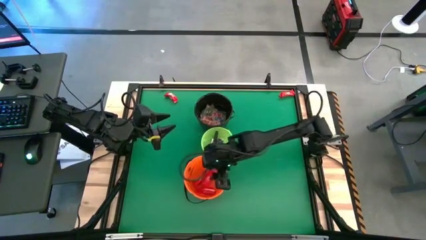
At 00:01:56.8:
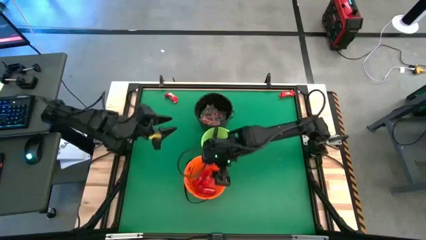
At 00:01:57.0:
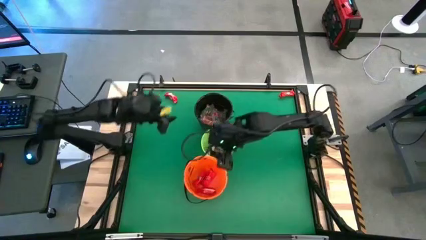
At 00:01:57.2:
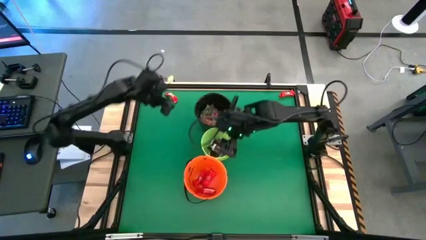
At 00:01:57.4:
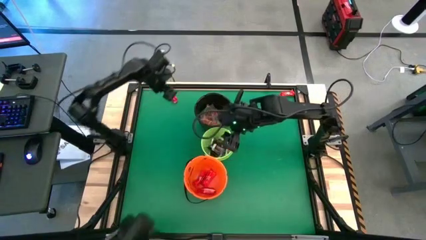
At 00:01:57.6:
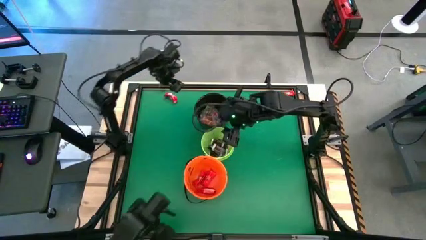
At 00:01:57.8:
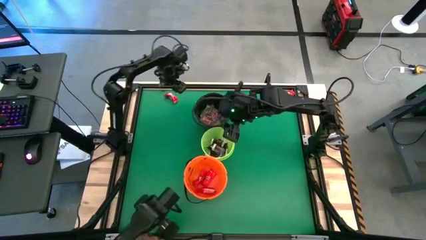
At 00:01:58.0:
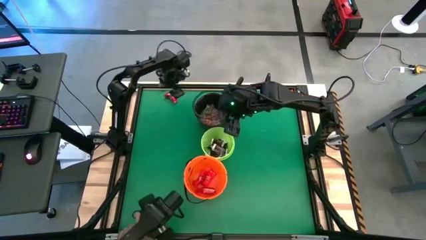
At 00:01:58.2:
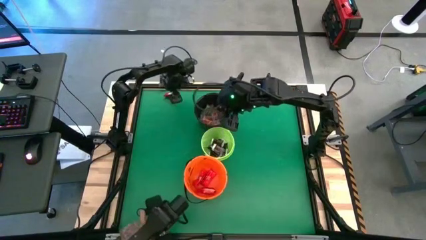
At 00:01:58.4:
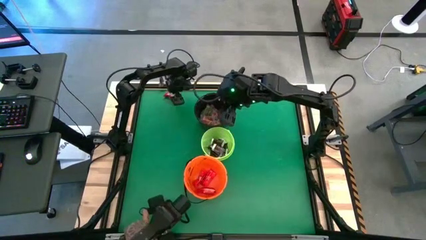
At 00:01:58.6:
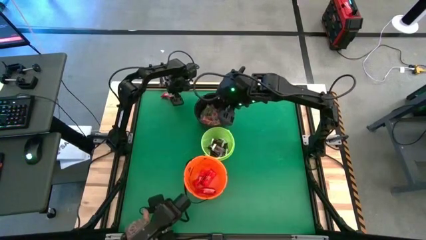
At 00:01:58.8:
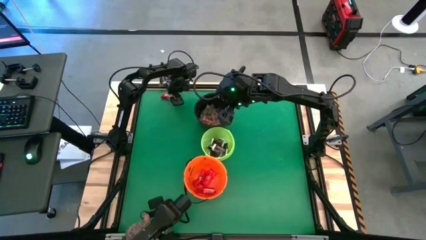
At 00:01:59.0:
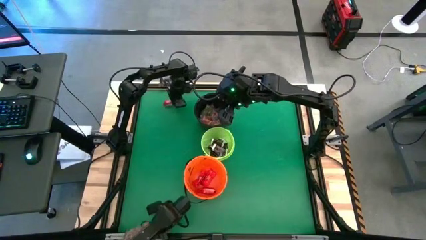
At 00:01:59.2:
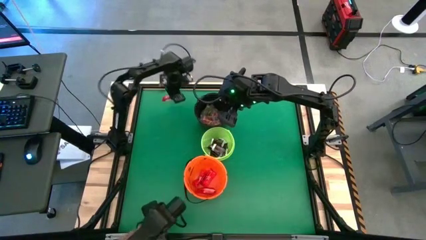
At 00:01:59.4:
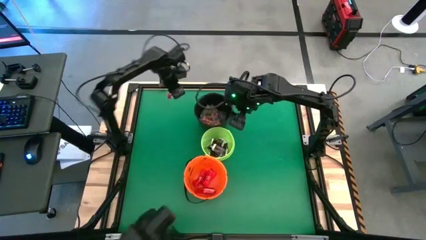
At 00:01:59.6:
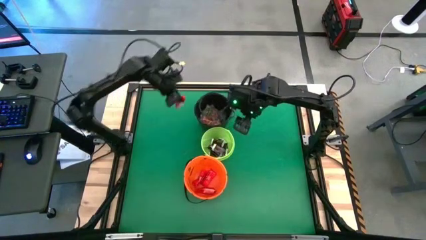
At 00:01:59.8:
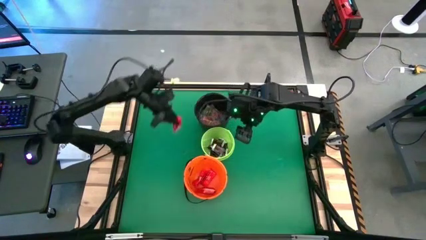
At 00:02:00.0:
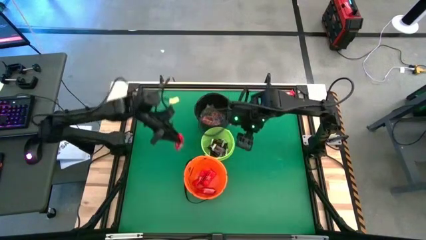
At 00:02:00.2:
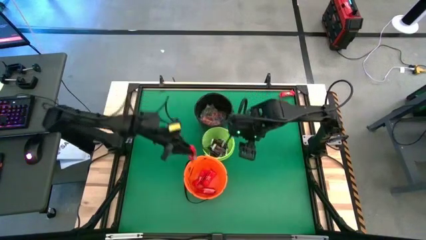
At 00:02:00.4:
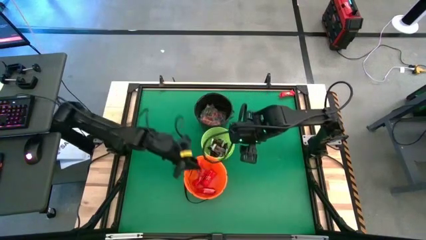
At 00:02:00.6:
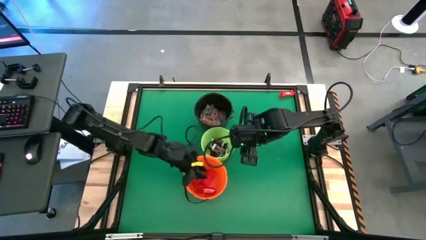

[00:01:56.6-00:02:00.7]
Task: Sort candy by brand, put in halloween buckets
Put the red chocolate bar into the orange bucket

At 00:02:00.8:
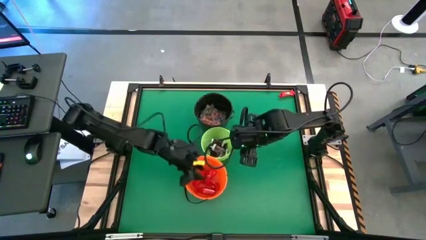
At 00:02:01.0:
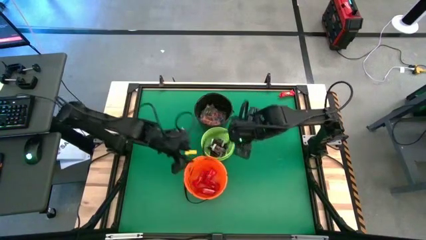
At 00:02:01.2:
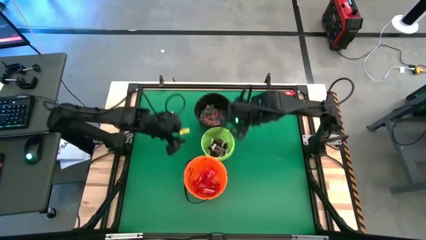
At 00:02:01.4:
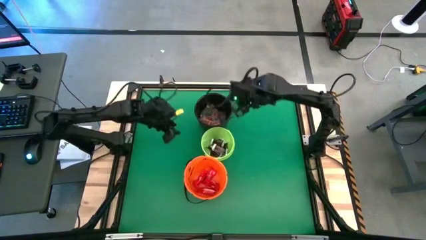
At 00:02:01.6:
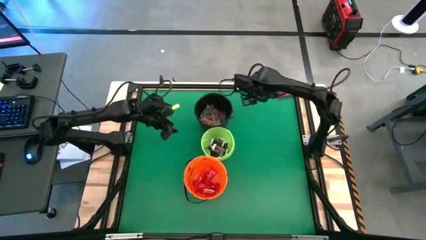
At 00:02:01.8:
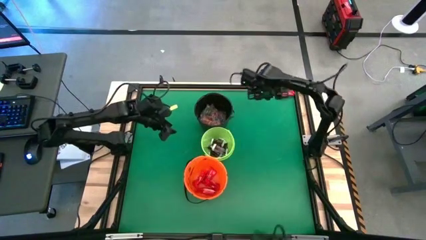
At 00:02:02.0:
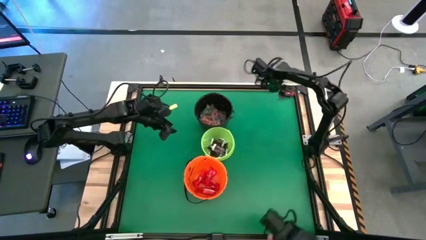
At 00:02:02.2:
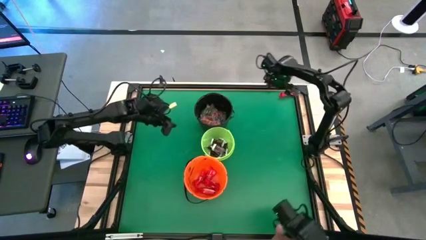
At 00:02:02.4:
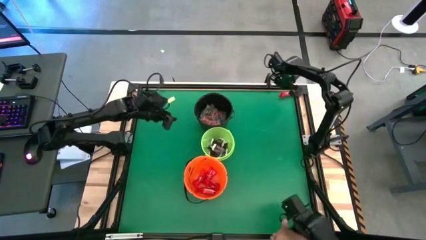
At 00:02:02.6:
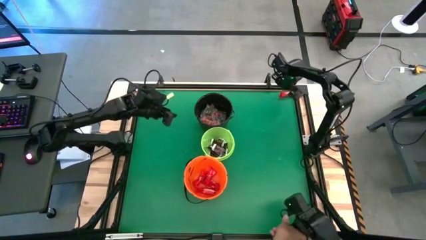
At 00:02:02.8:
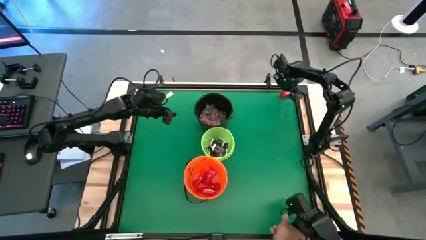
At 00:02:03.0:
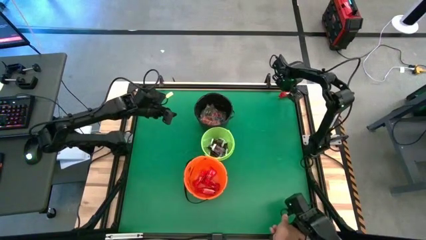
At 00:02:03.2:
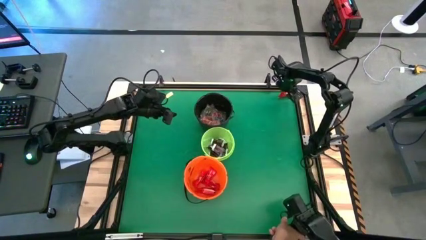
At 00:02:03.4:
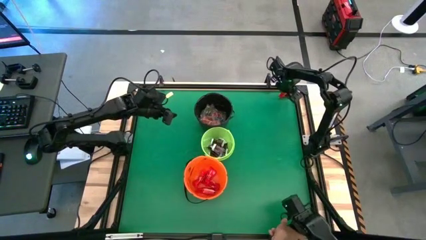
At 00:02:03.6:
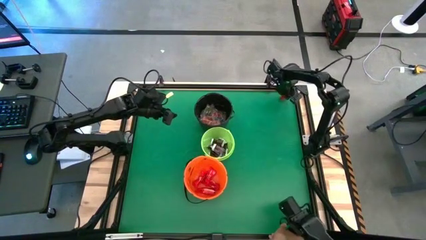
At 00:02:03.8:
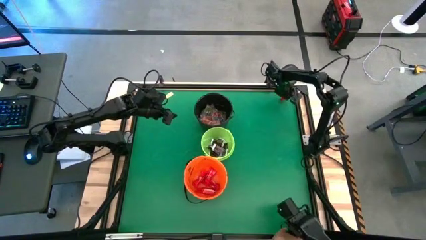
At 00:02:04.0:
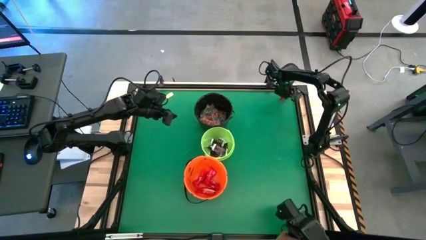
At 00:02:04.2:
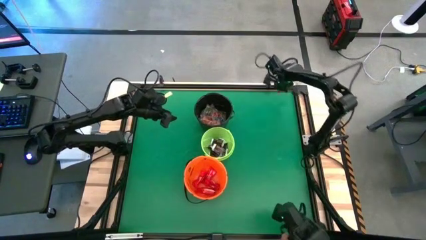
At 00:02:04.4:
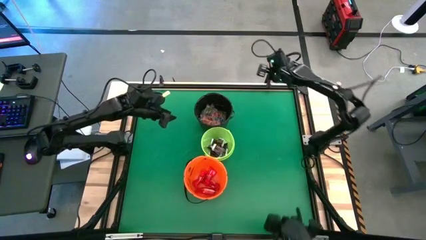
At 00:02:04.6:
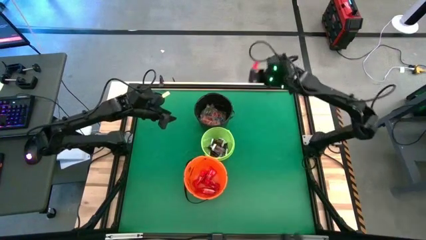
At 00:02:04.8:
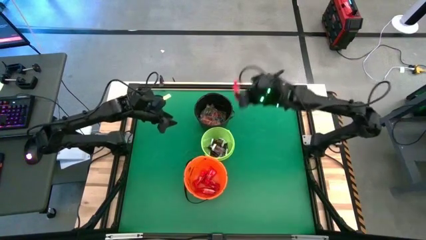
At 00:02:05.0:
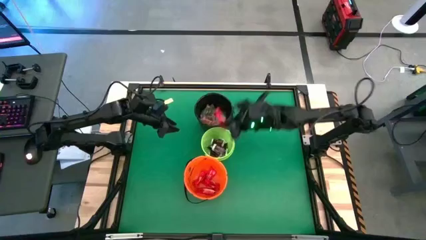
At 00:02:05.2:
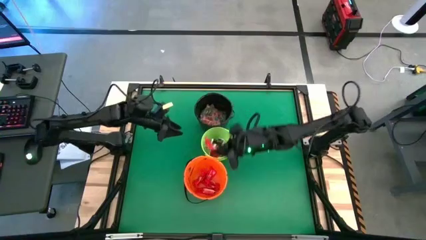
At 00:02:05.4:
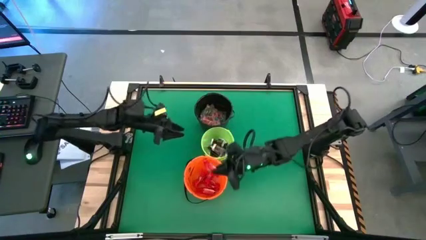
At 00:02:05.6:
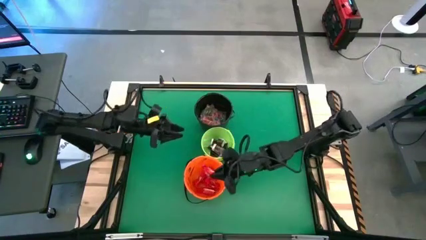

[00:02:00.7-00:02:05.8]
Put the red chocolate bar into the orange bucket

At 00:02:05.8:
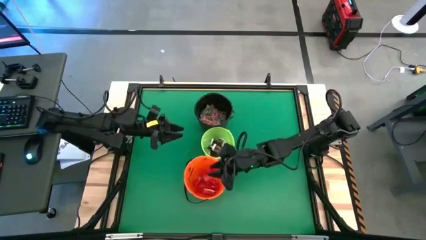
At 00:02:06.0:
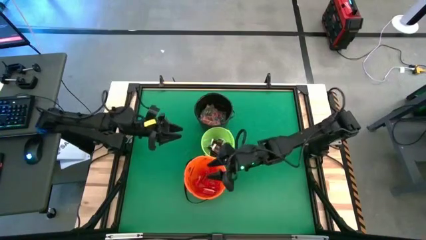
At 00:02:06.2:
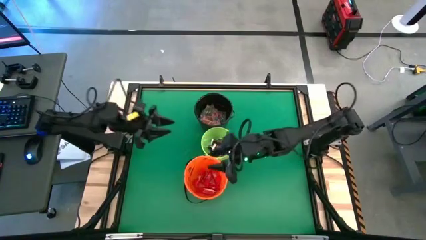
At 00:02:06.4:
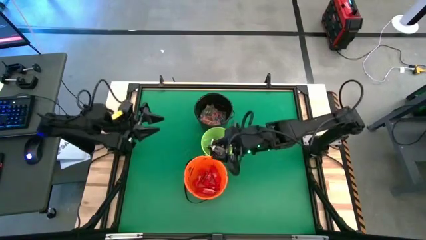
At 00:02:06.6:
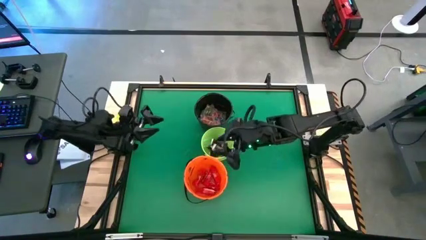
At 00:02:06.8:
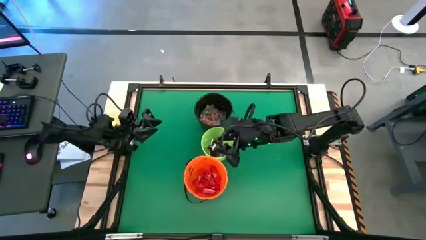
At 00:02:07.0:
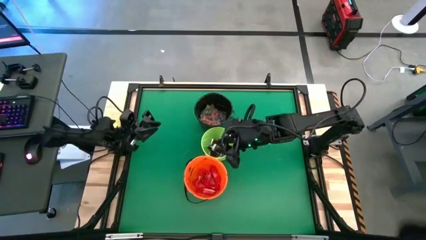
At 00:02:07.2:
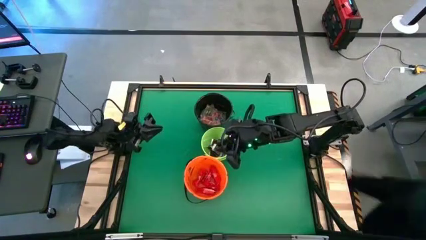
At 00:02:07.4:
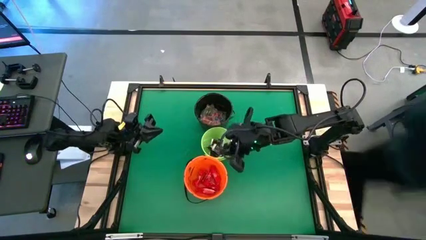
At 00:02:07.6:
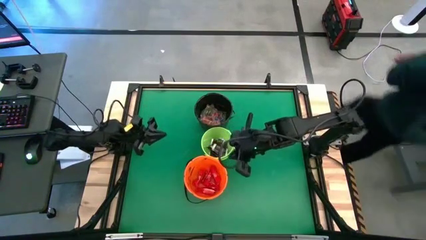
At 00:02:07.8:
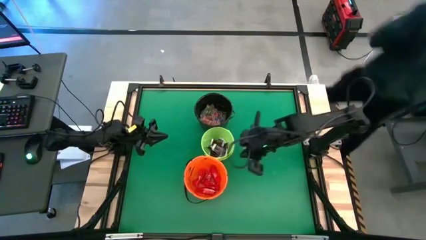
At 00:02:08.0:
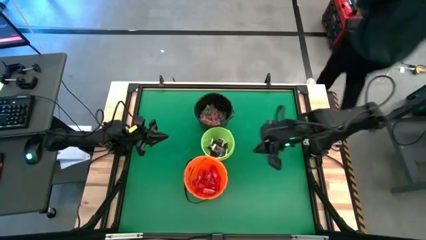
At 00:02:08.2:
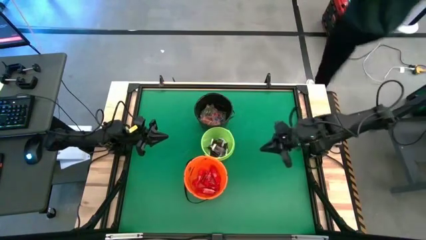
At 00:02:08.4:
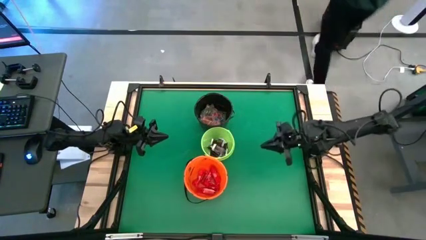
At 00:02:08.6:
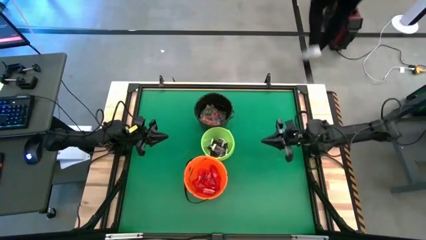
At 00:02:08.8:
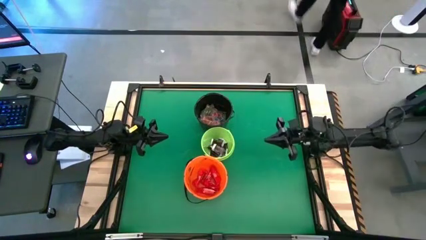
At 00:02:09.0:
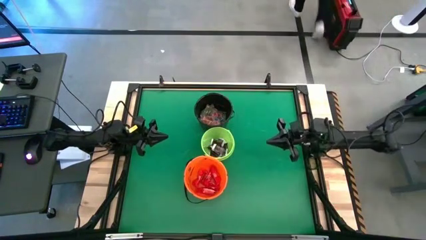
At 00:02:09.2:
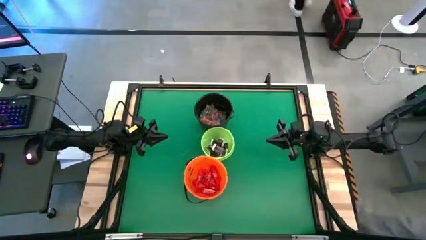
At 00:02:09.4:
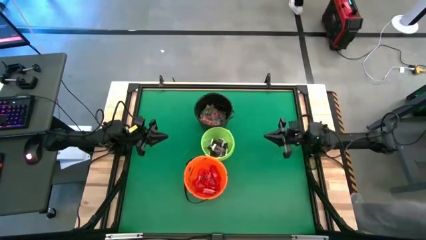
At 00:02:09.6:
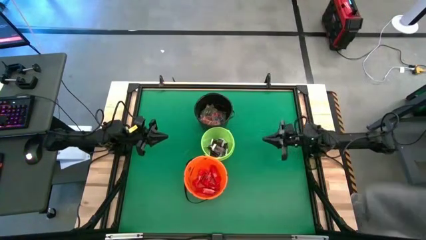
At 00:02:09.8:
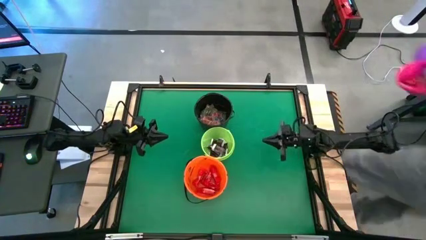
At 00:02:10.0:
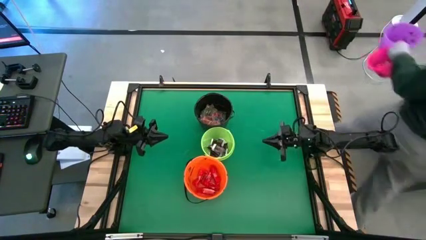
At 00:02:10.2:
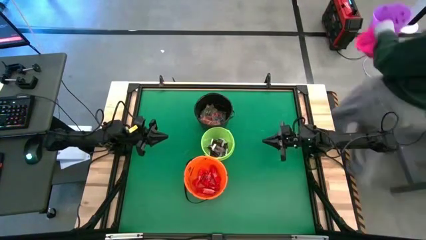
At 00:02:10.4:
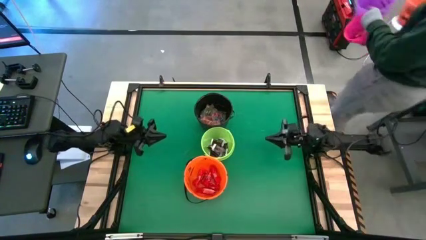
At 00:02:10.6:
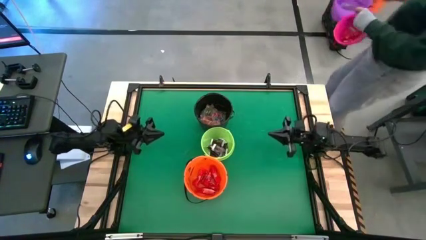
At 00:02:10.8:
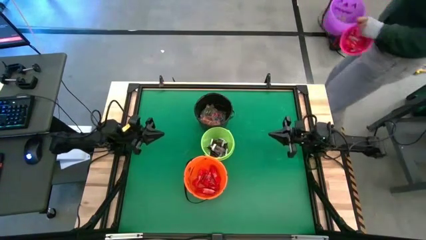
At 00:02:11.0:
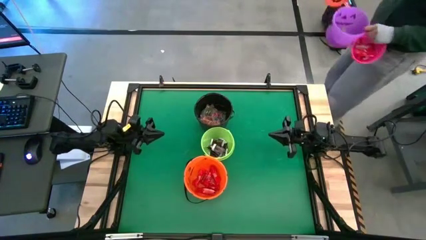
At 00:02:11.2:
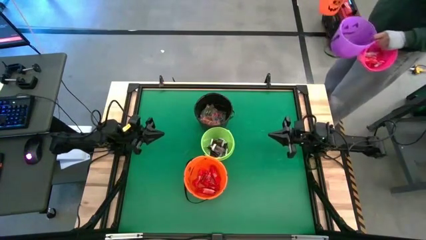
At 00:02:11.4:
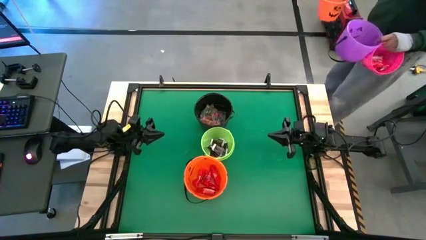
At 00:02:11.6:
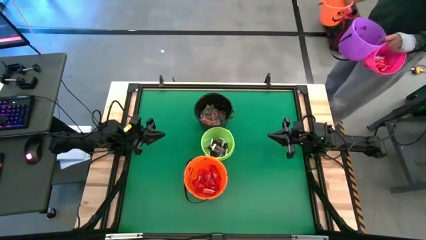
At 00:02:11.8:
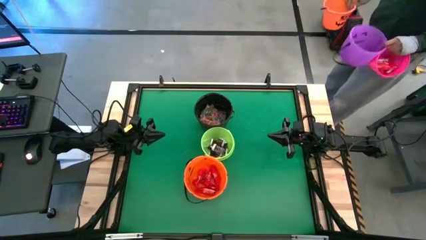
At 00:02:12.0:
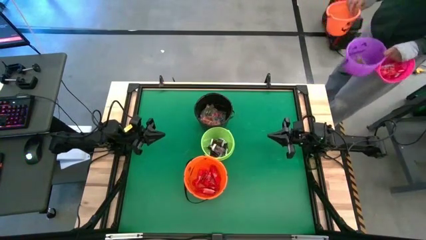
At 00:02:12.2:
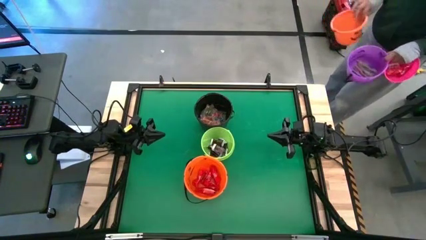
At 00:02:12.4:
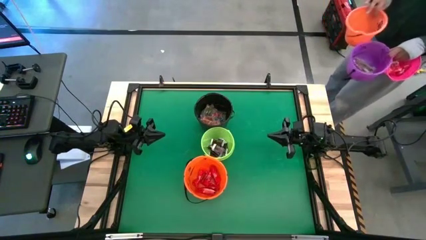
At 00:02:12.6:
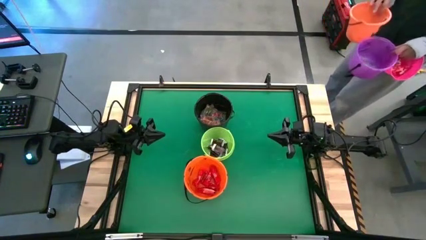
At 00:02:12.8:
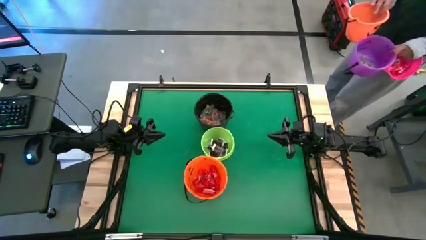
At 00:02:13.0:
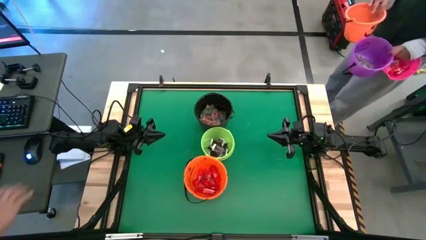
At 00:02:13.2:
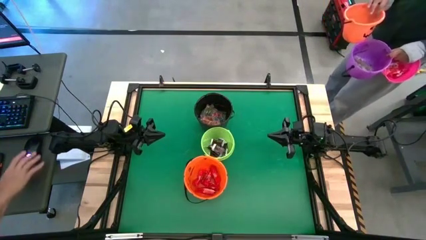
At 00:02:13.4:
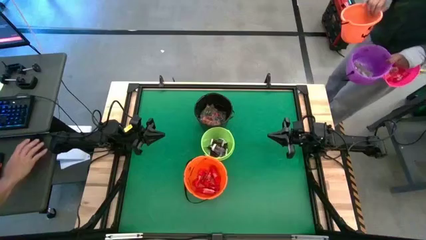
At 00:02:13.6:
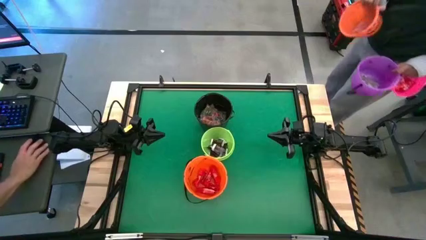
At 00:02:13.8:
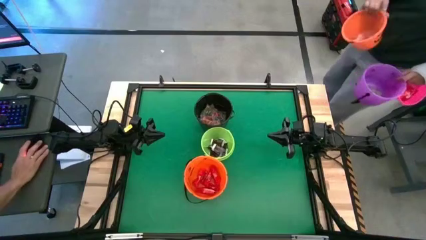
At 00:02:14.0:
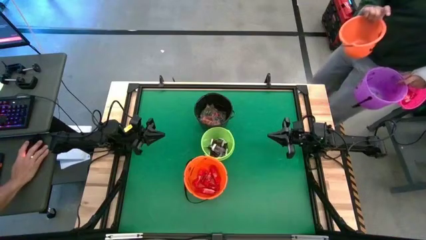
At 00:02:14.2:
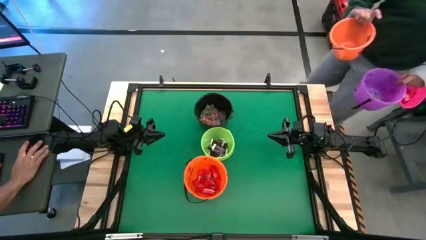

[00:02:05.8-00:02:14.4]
Return to Home Position
